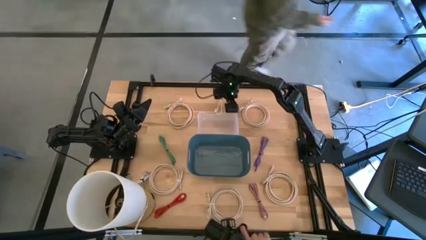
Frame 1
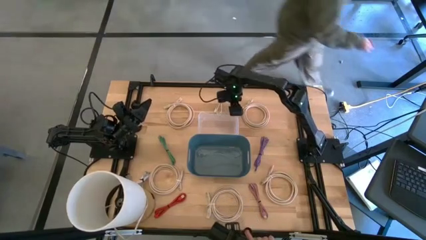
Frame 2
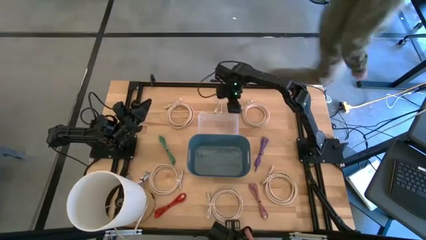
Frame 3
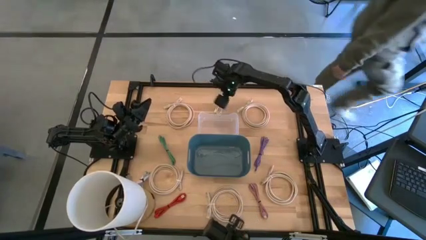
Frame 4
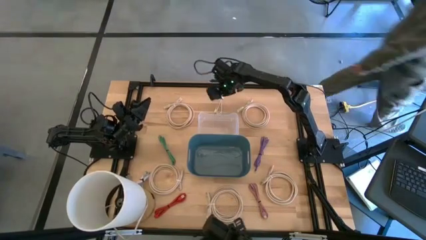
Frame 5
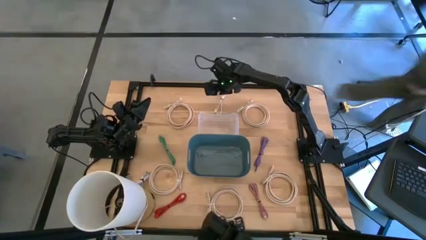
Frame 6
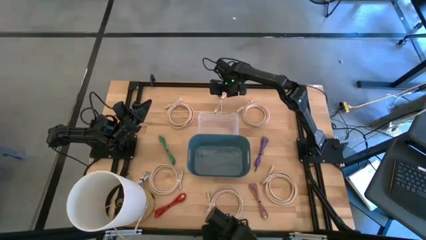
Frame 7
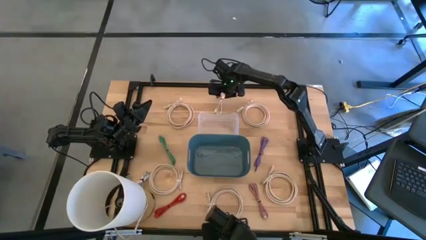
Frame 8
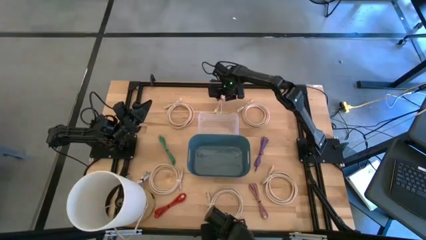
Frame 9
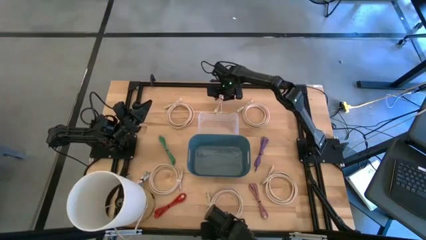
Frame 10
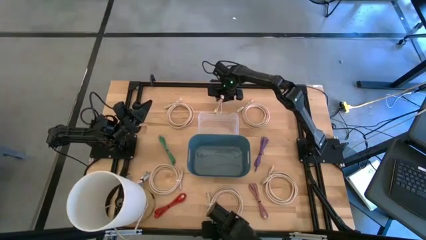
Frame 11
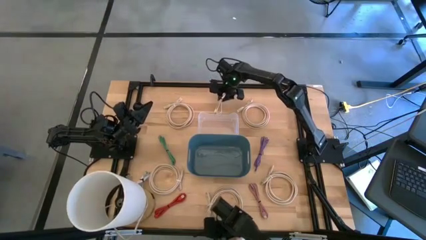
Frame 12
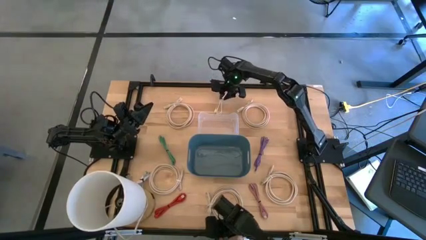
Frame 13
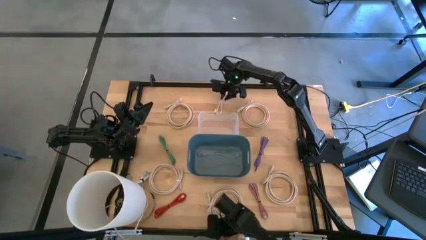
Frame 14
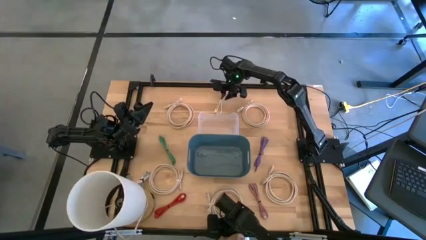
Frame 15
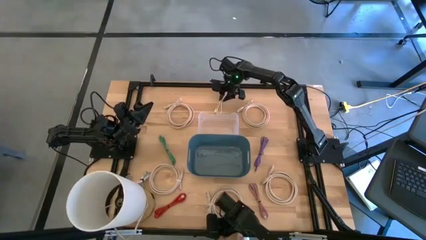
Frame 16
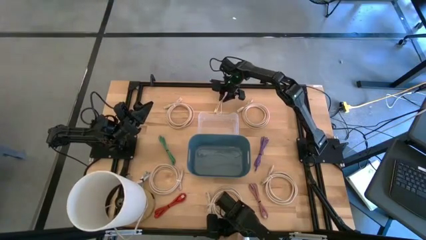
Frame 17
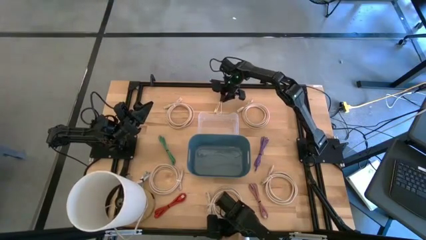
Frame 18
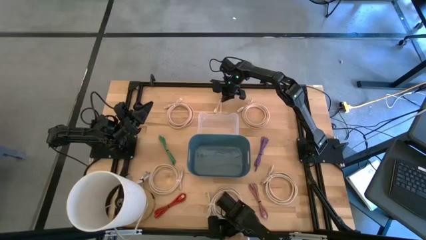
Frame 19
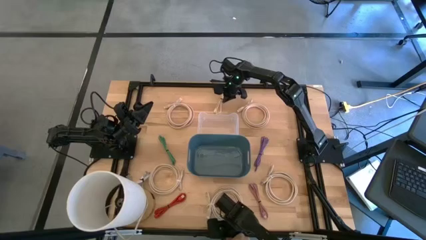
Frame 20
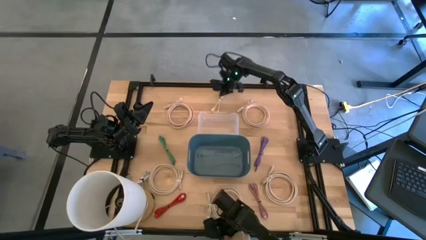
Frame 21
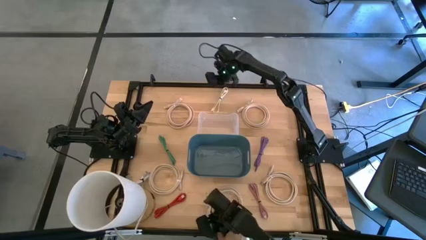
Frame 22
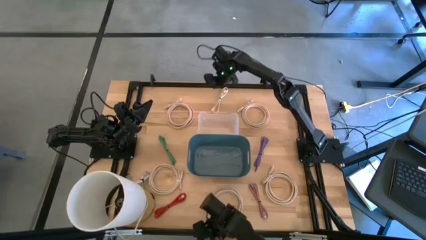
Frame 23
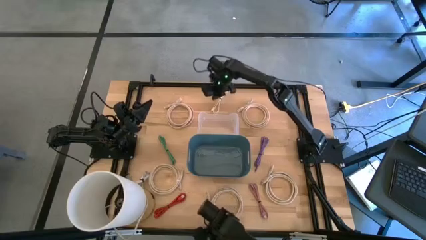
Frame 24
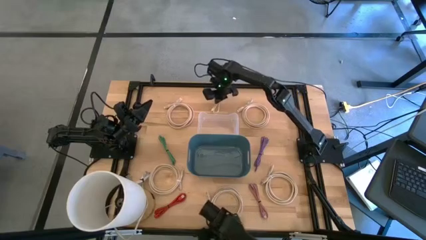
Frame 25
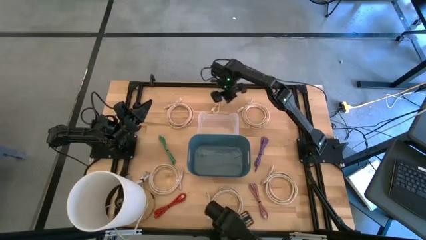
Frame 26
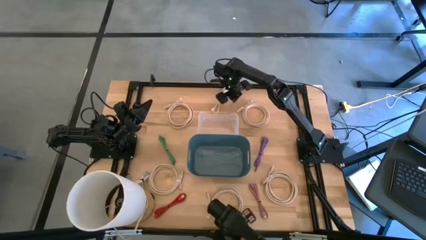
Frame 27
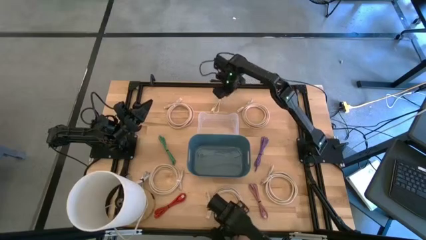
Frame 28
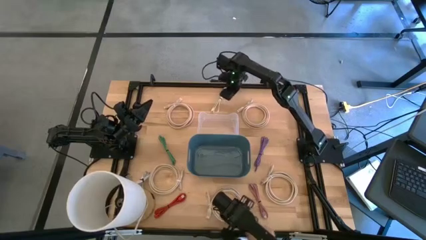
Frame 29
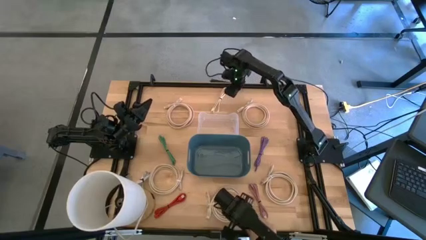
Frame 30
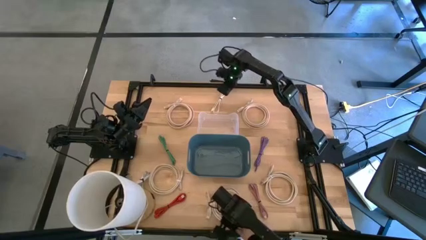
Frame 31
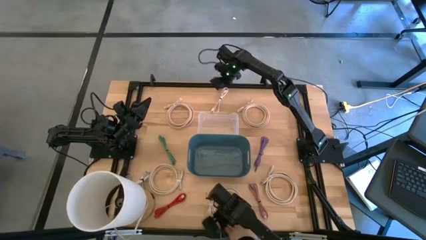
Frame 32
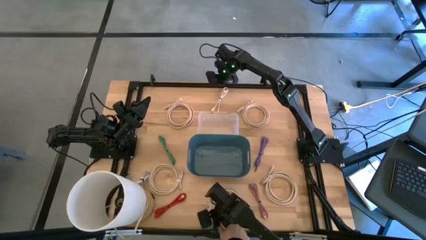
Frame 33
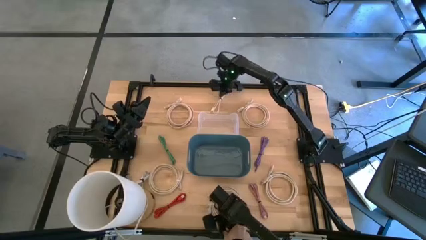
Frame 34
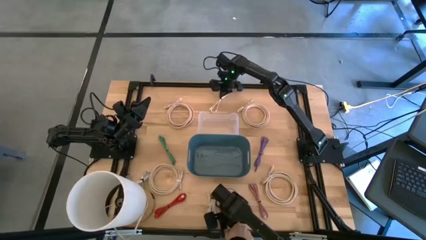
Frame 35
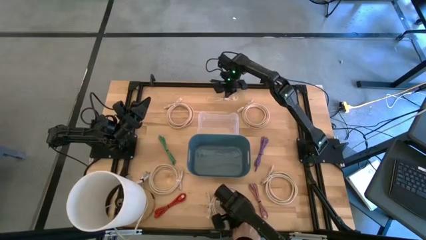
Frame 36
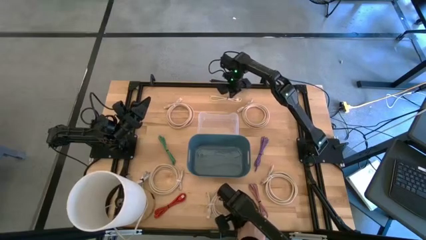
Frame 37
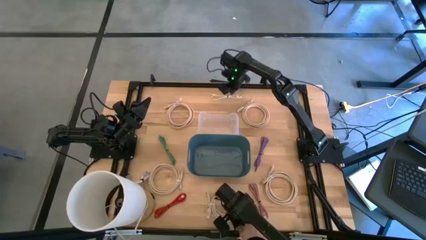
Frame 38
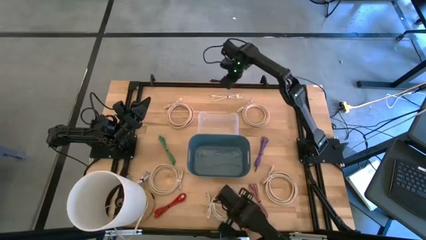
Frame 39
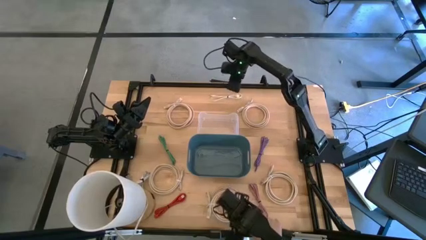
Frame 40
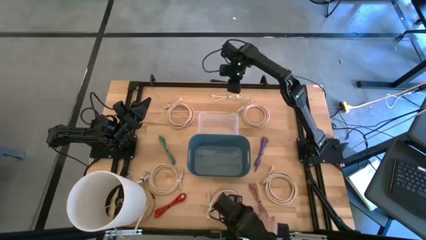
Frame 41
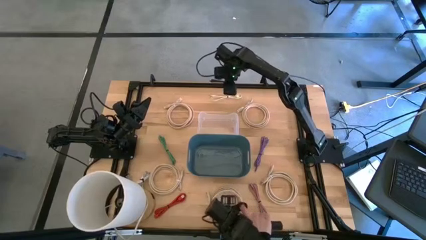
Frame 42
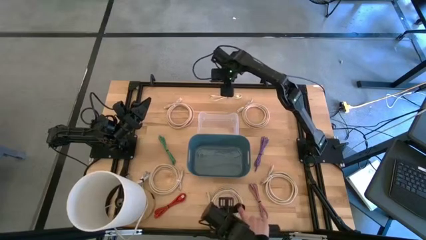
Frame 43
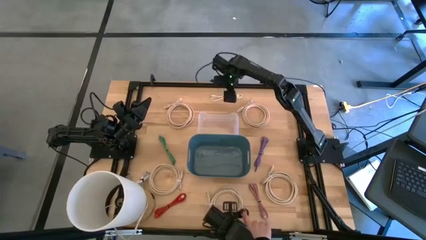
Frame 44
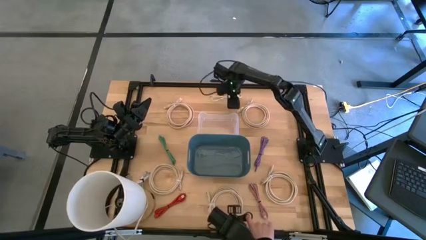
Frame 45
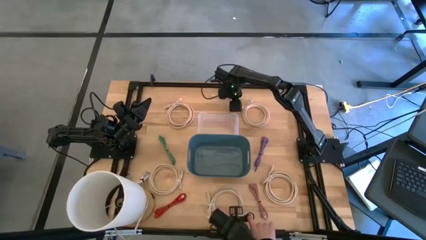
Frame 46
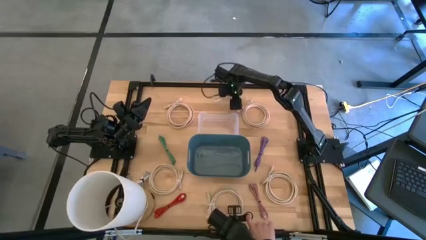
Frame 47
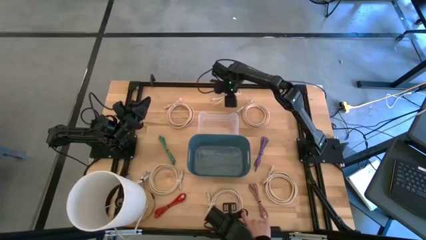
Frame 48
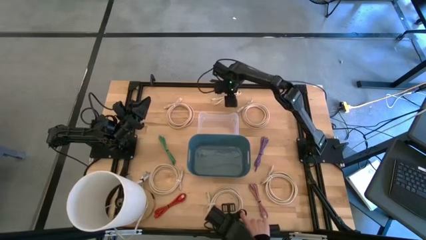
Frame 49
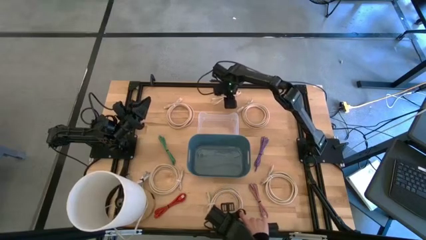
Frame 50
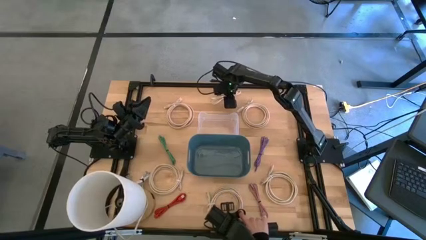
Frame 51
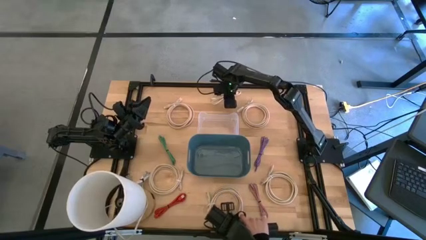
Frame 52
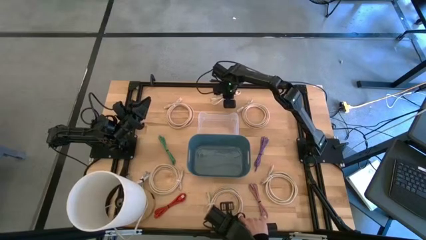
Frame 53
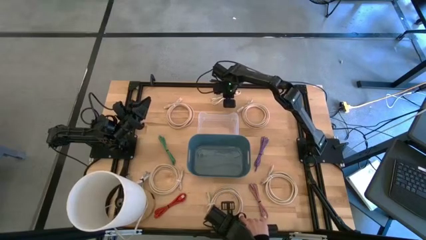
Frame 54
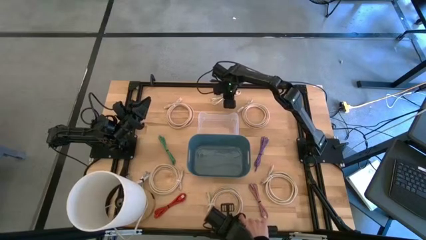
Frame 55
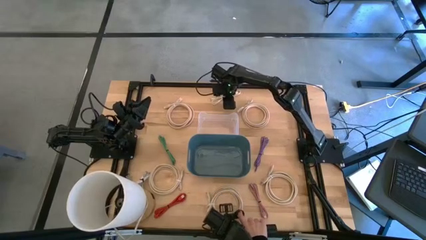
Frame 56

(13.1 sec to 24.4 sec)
Put the white charger cable into the transparent bin

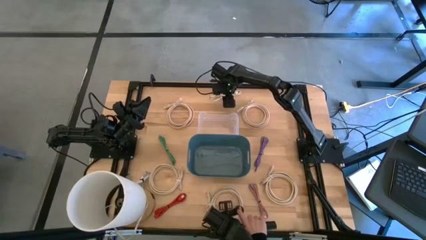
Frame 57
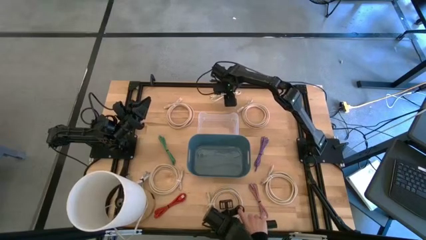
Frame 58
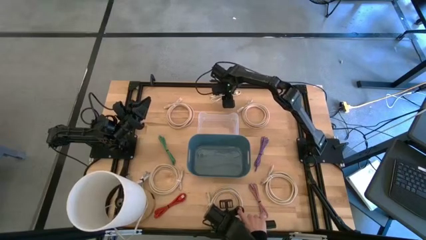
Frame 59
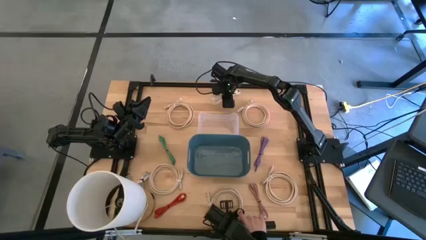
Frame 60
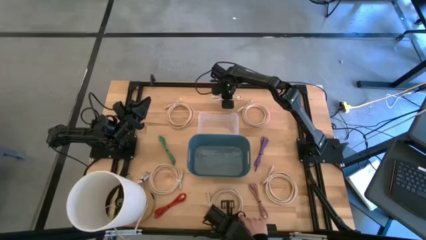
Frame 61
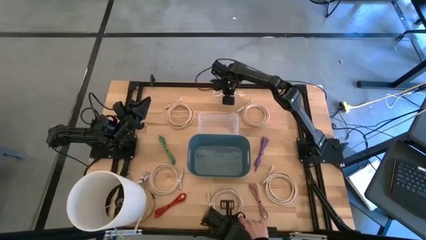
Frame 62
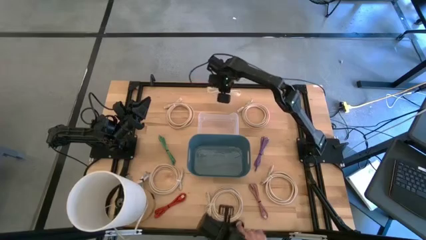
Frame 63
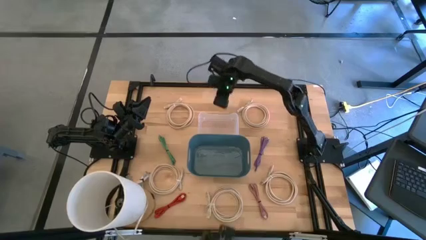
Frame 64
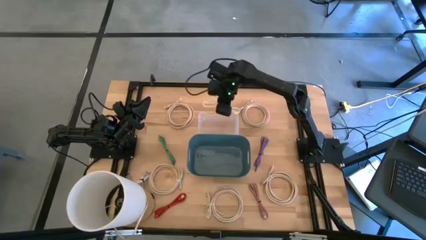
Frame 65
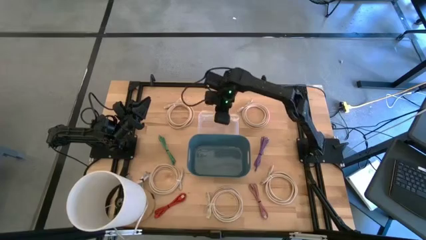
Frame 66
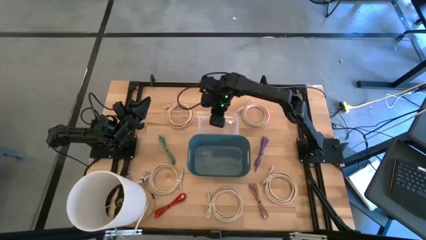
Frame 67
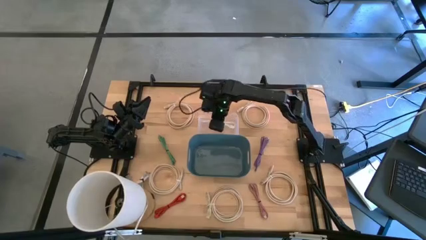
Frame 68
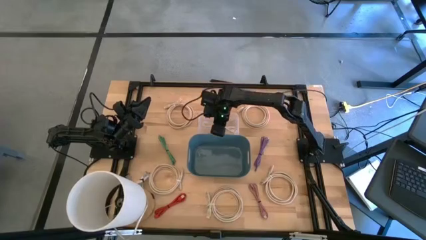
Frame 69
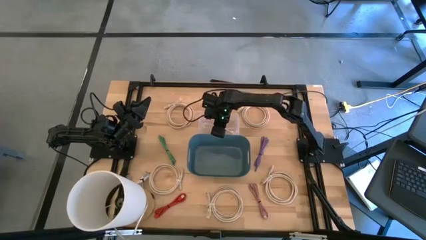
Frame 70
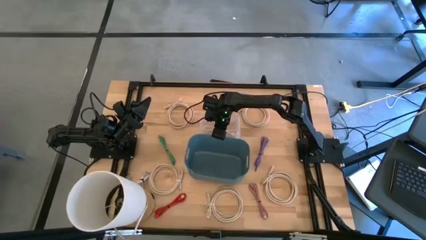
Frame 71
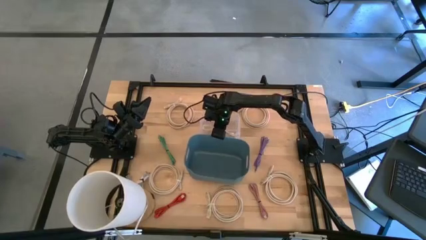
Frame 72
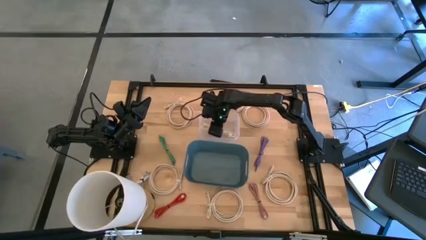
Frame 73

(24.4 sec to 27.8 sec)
Put the white charger cable into the transparent bin

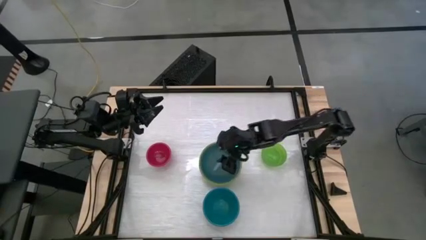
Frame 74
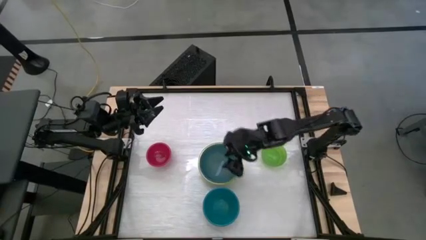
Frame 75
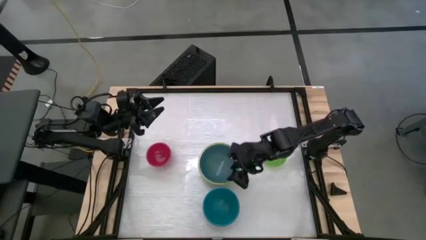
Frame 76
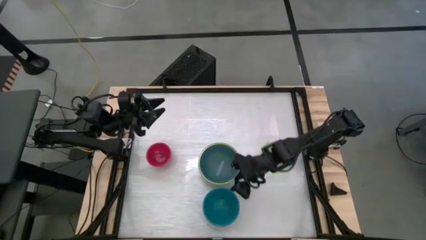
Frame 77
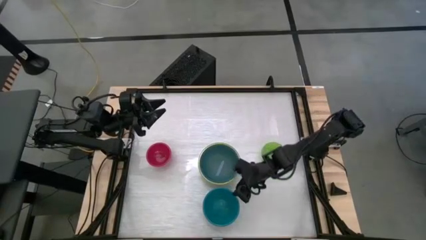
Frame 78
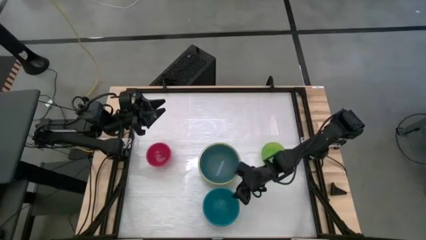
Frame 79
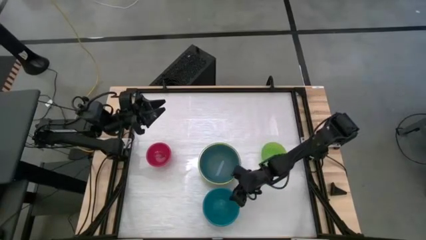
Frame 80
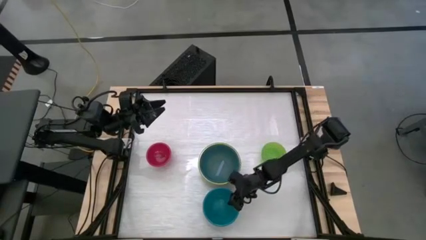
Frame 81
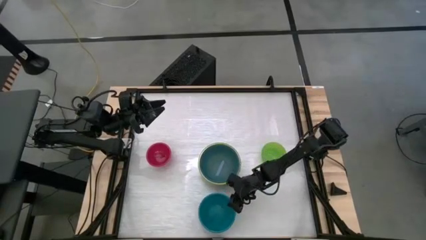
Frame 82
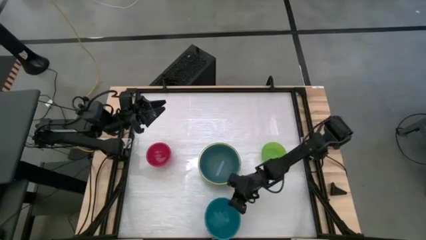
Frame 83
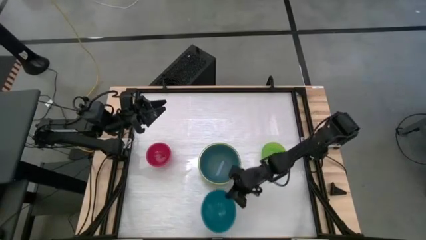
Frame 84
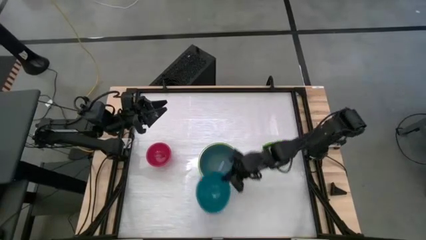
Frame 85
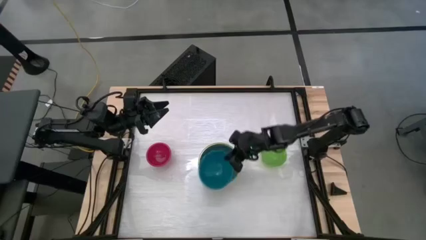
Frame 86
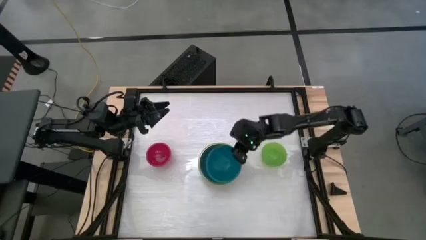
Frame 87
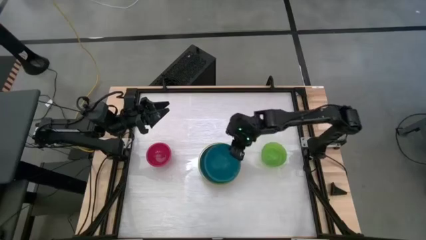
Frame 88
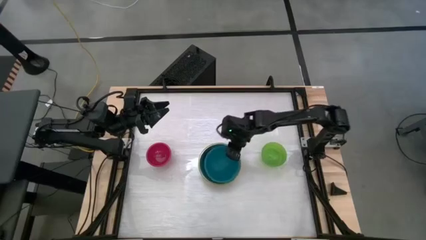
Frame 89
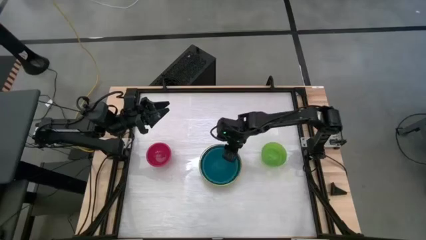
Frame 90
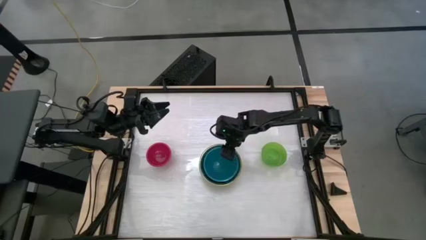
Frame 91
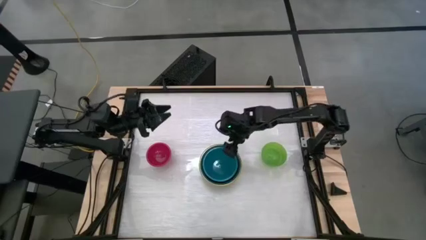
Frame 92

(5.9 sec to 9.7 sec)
Stack the blue bowl on top of the transparent blue bowl
